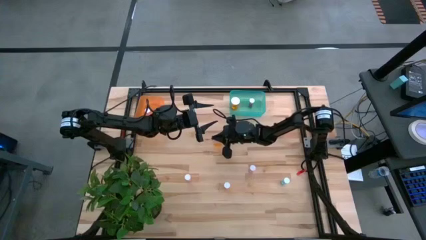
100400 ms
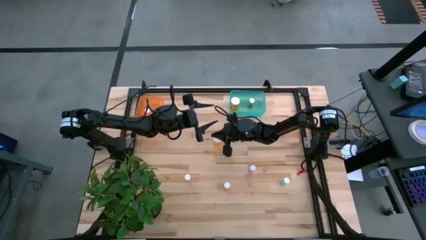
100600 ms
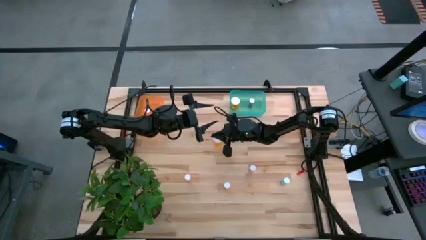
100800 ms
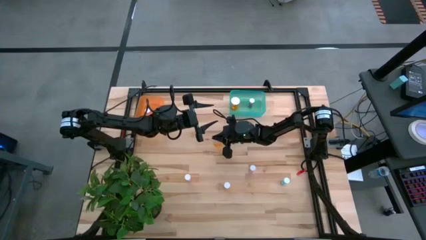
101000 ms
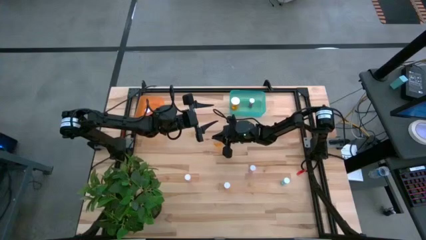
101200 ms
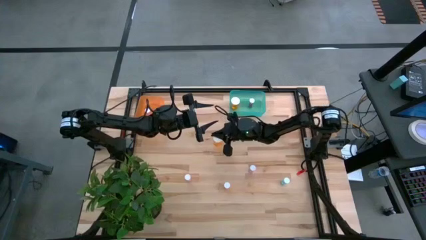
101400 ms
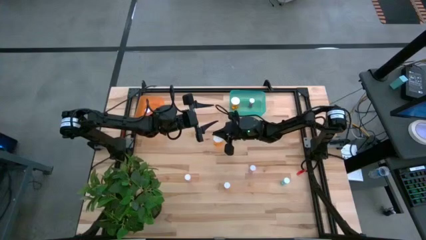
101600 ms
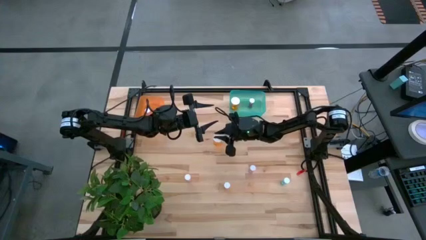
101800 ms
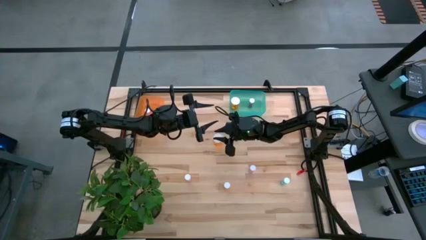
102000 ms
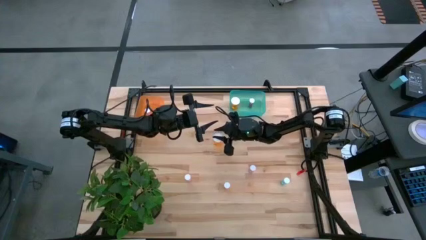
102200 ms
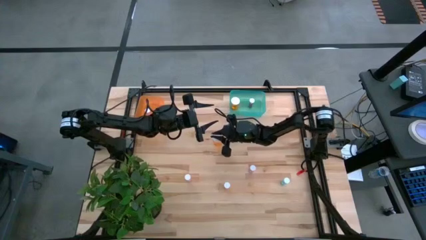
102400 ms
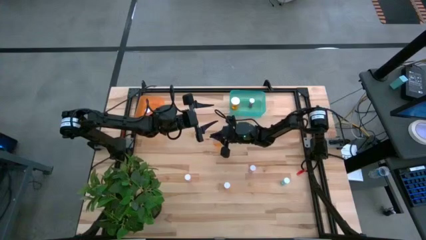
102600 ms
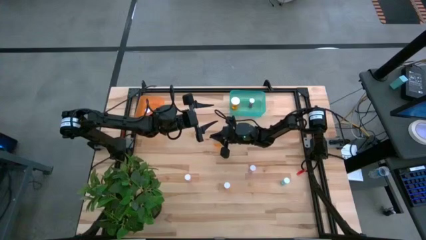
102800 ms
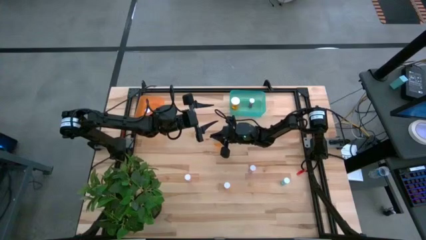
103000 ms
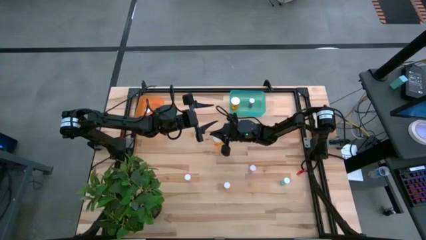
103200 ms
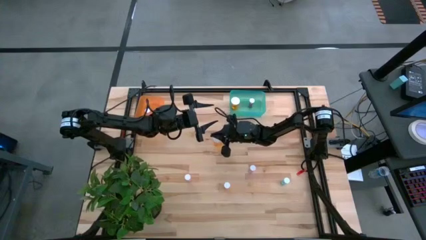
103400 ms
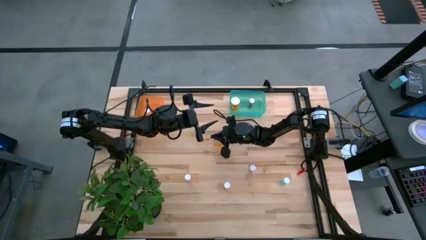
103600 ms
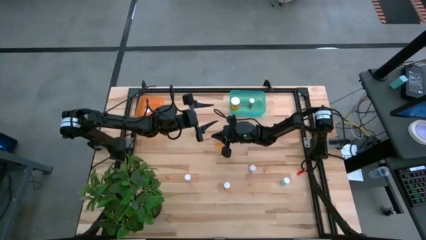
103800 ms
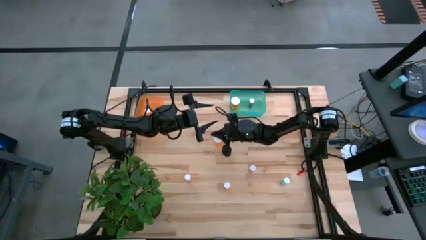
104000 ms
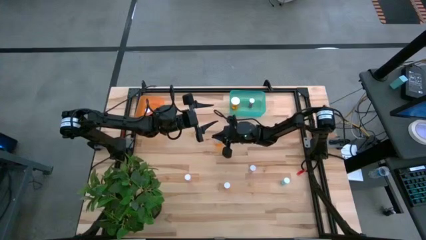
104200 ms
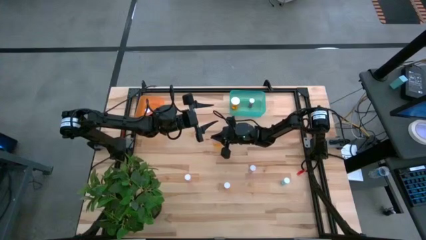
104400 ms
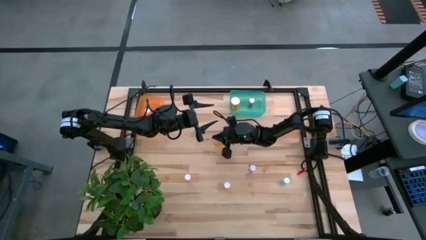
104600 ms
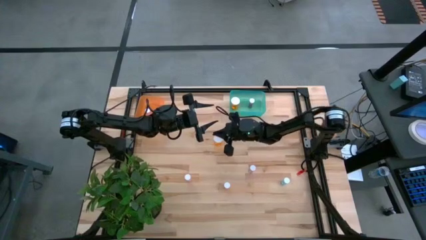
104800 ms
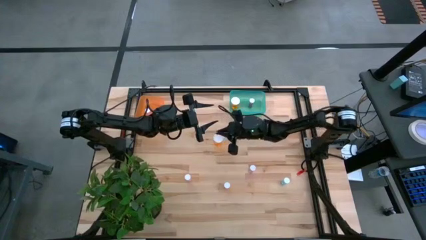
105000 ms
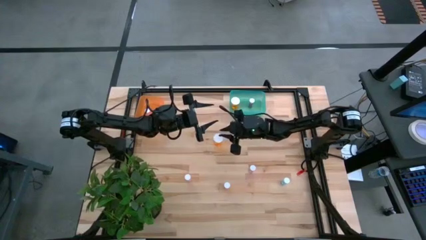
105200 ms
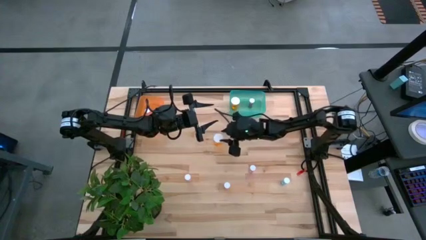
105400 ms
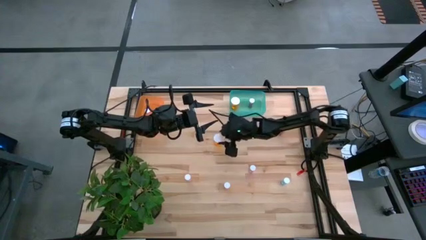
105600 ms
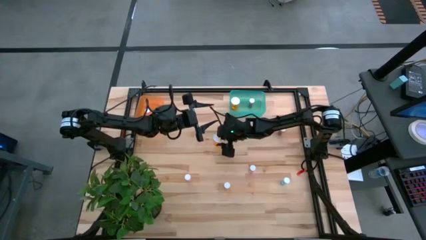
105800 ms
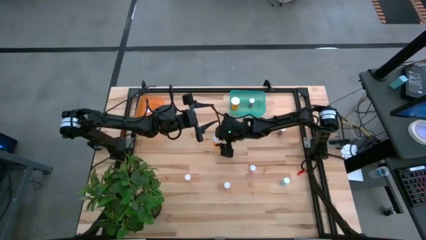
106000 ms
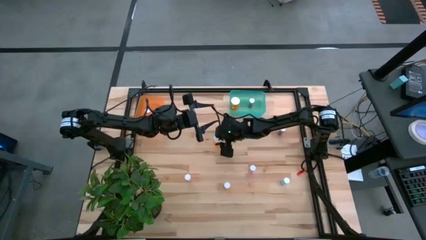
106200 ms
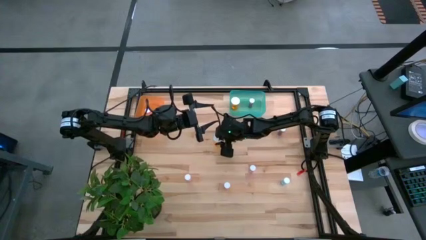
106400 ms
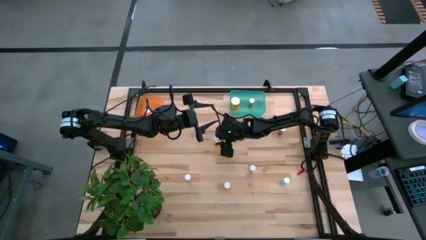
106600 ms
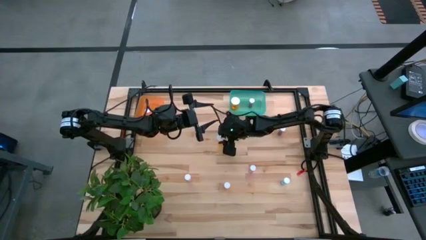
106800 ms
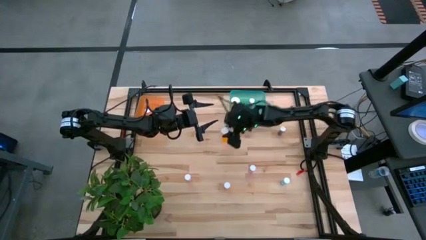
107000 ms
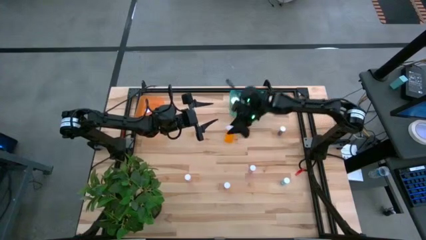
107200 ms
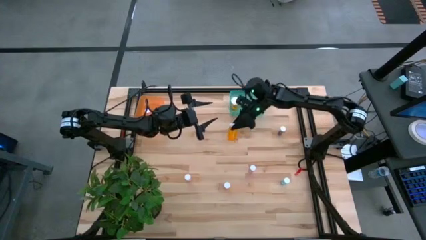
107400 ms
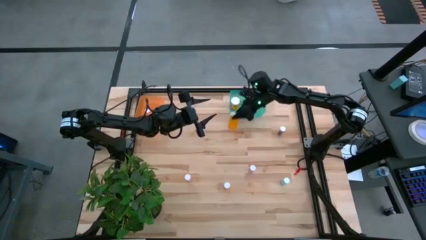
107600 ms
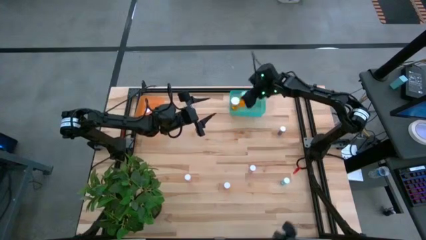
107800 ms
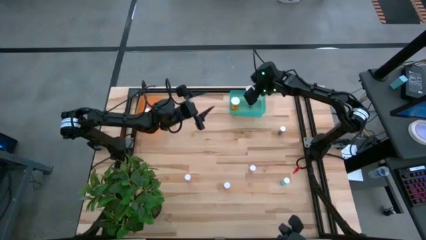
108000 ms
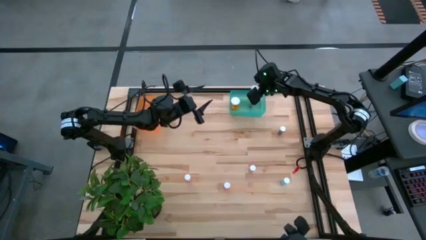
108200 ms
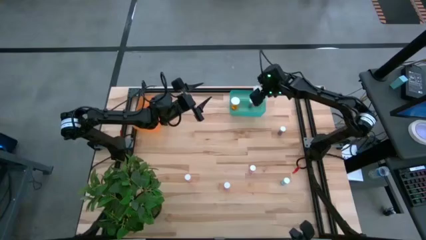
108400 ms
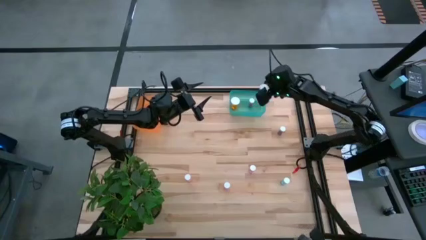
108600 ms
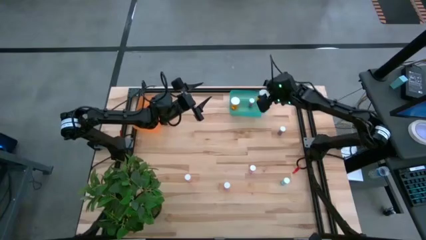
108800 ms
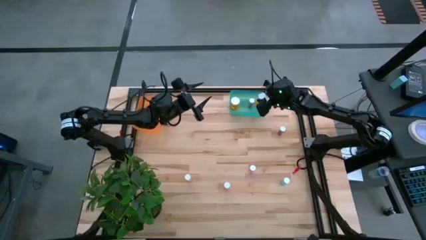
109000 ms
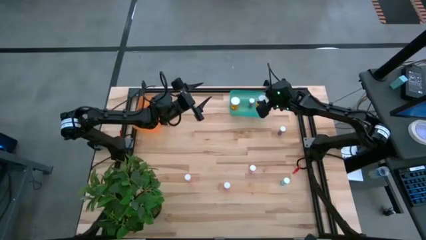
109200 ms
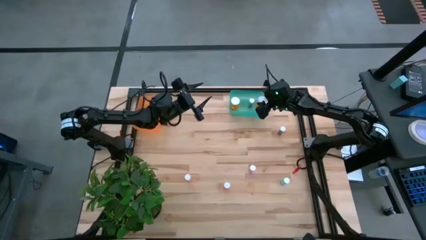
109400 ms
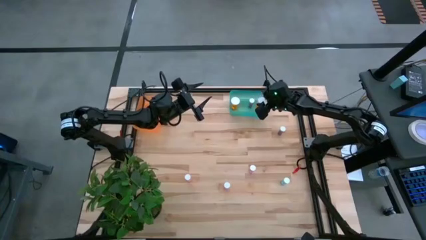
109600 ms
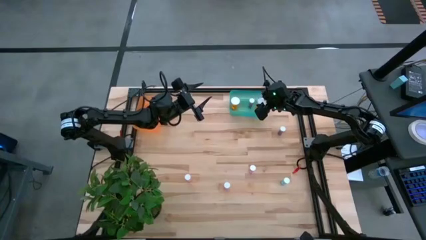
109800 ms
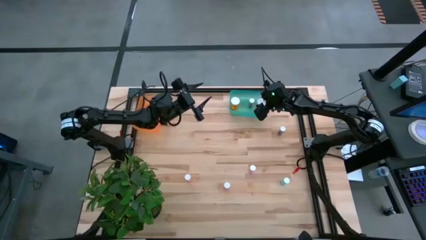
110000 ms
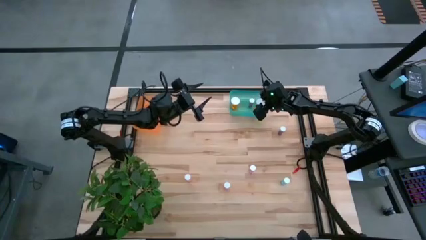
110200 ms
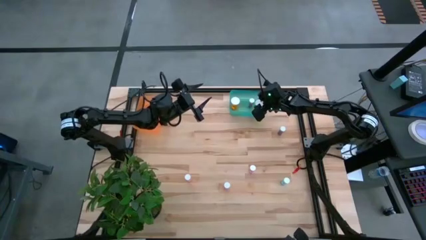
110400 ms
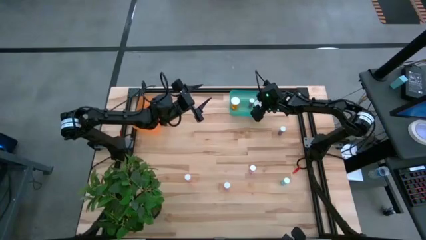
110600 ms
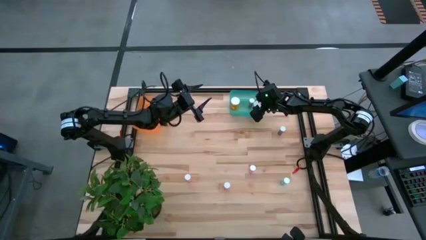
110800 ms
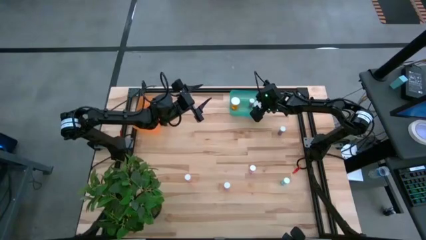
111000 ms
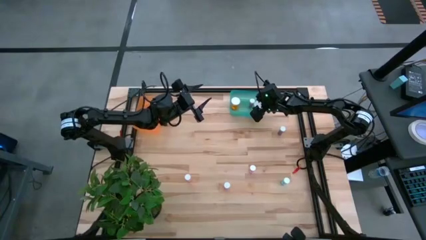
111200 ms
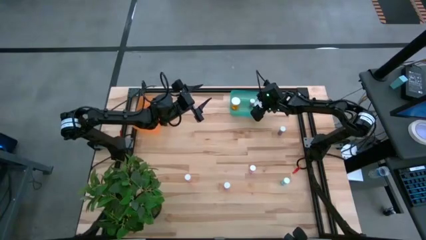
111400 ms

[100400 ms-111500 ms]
Task: Pick and place medicine bottles into bin by pill shape (circle, oval)
Put the orange capsule bottle into the green bin

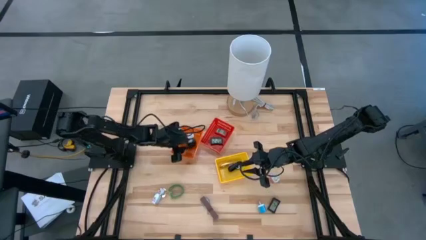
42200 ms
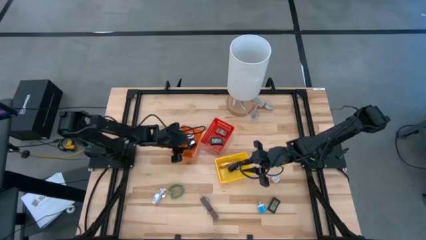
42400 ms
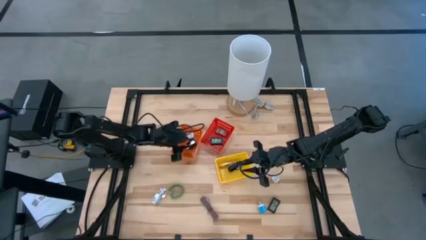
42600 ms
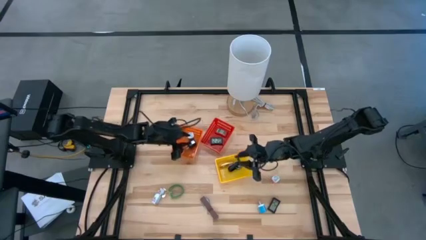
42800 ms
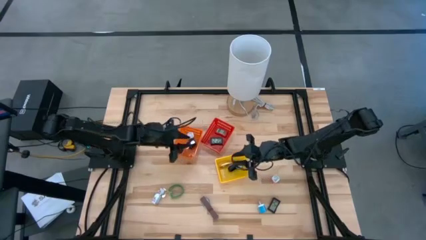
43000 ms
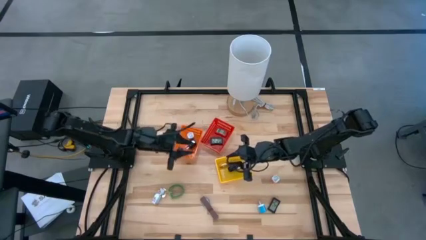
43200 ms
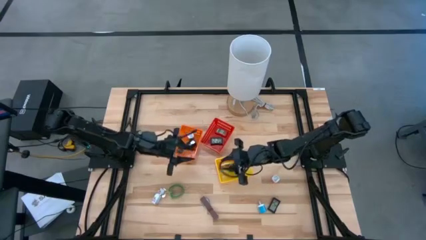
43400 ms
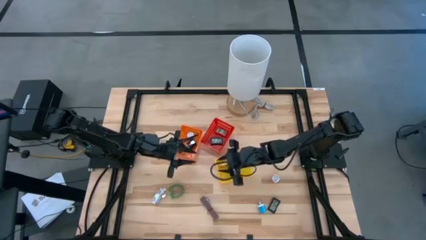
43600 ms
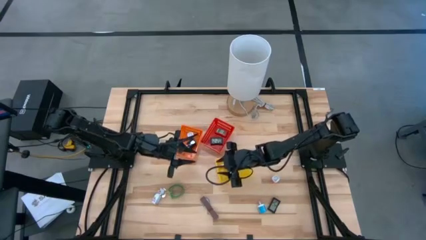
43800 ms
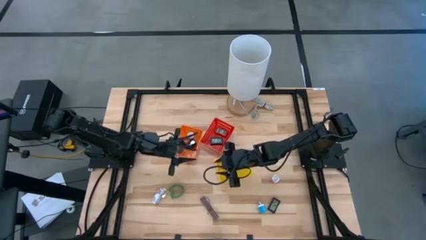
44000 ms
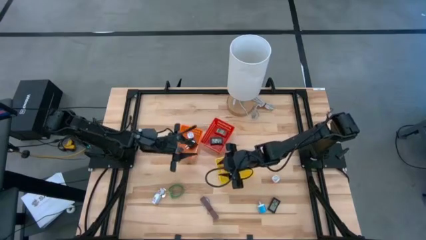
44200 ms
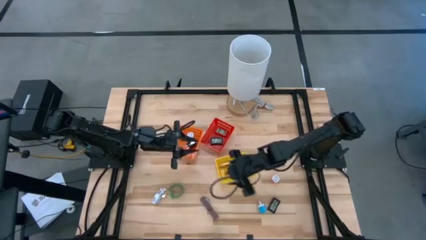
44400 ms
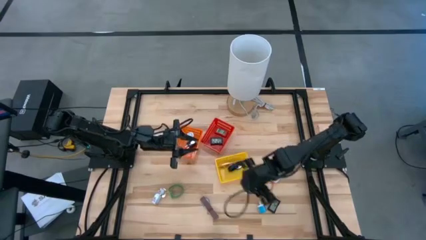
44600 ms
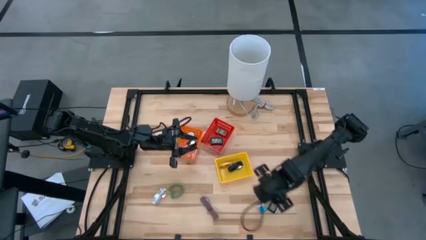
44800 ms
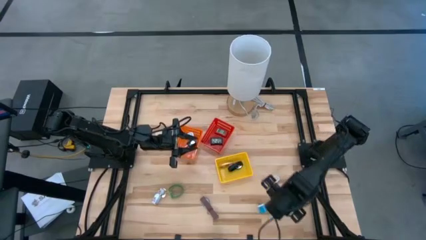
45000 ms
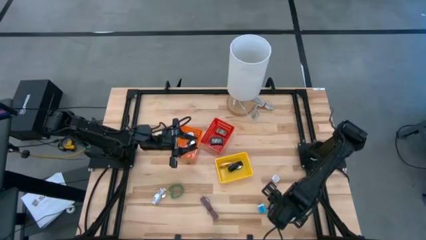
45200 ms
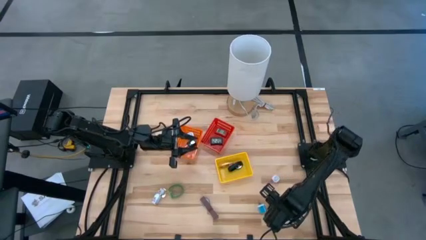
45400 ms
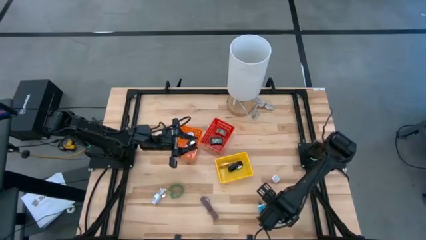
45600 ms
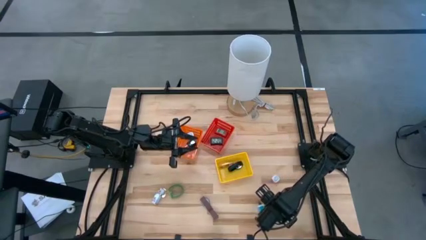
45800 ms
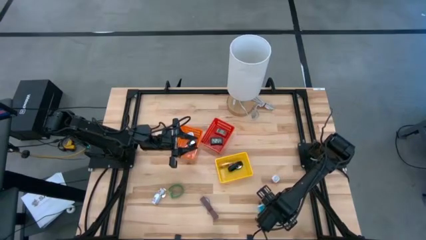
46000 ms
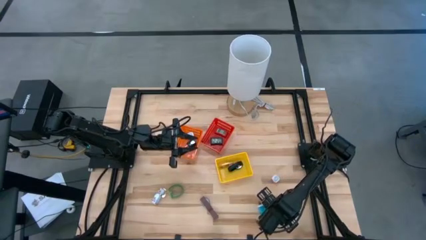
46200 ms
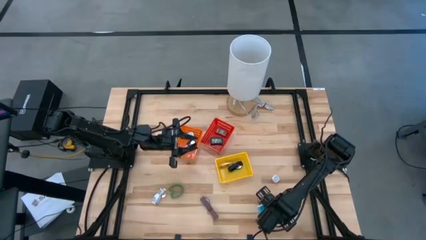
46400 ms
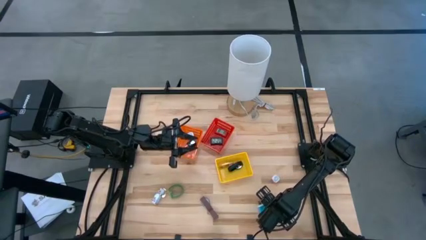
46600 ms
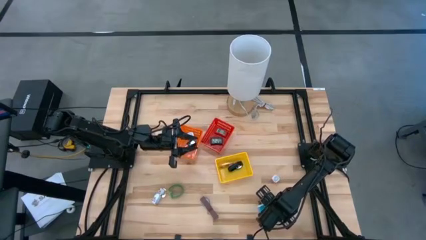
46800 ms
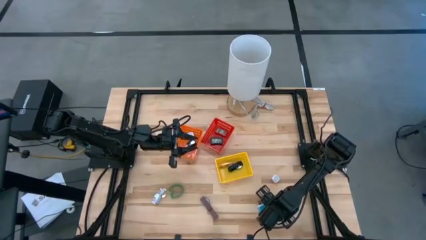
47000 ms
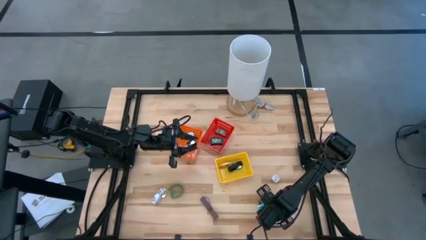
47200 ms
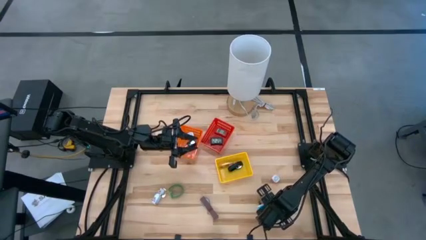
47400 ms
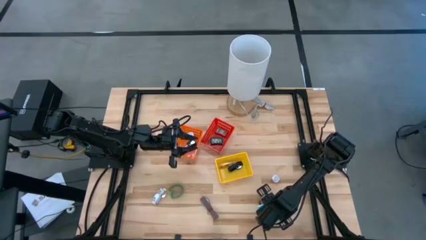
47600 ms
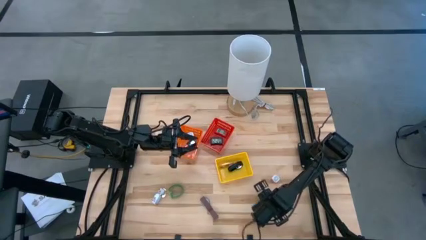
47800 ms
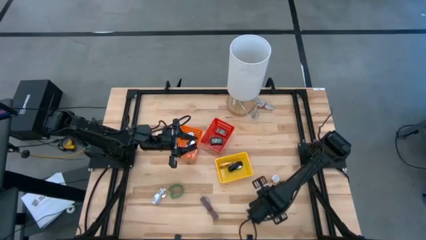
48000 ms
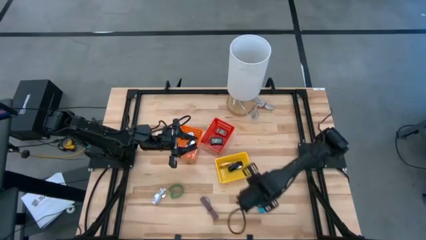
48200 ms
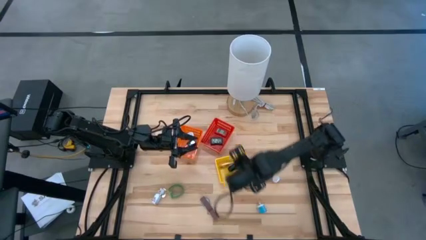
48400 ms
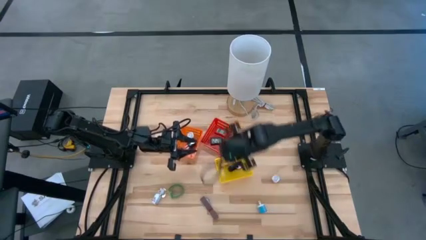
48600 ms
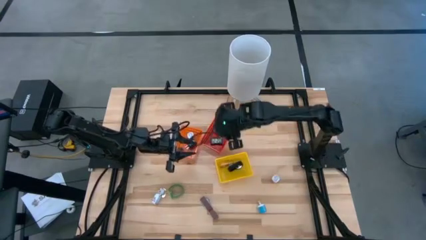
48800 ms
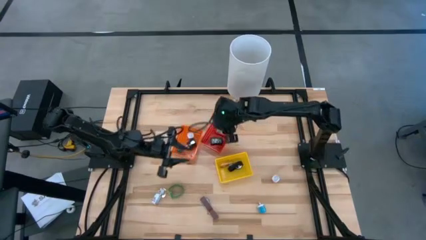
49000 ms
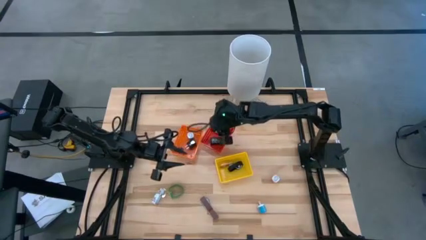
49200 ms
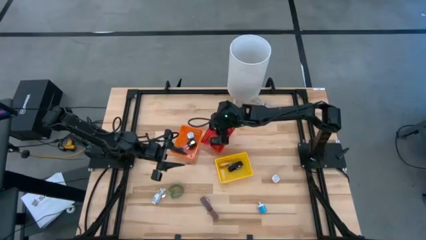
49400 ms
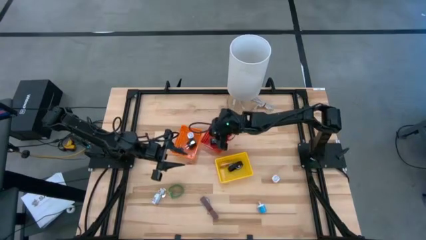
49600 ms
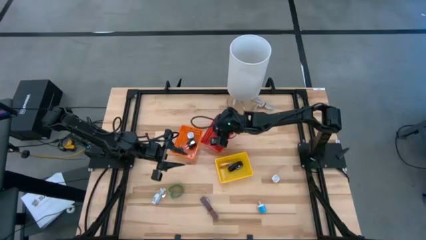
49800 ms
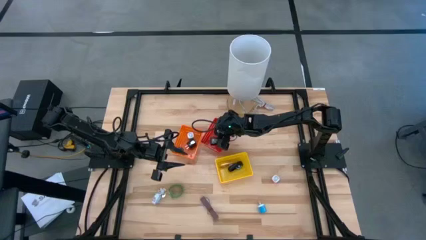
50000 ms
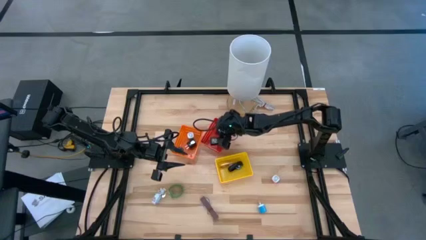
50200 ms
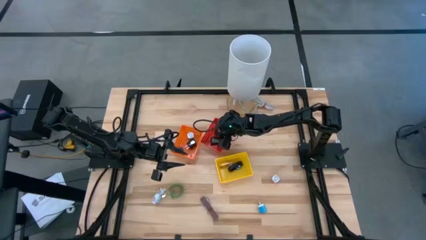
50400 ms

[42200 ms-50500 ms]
Task: Pick & Place Office items
Put the black digital clock into the red bin
